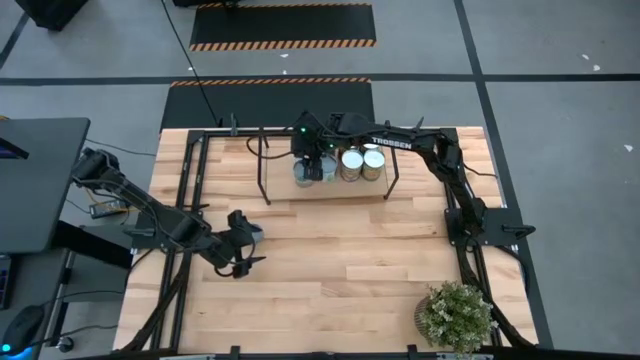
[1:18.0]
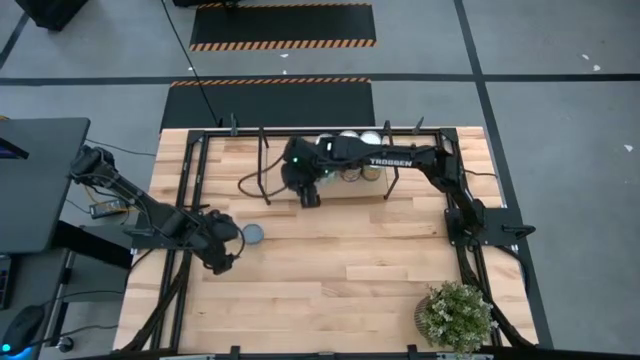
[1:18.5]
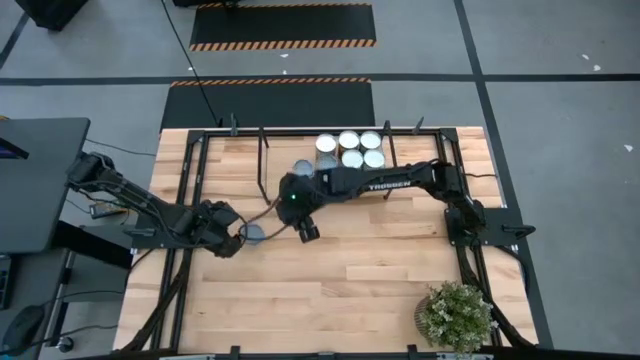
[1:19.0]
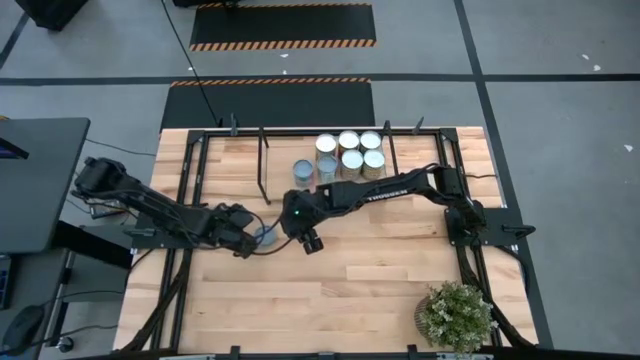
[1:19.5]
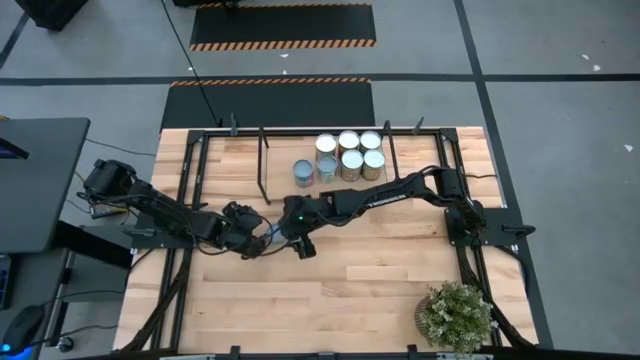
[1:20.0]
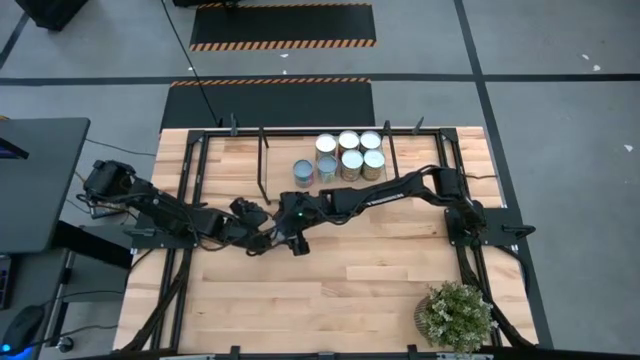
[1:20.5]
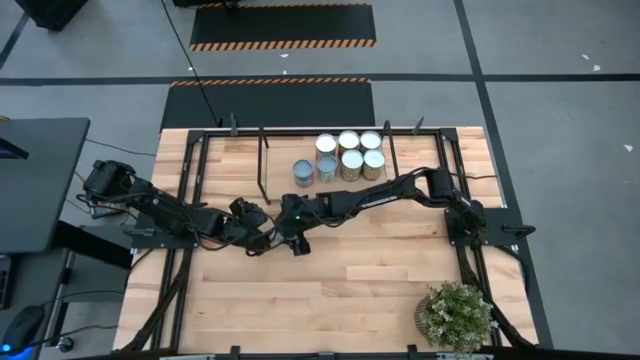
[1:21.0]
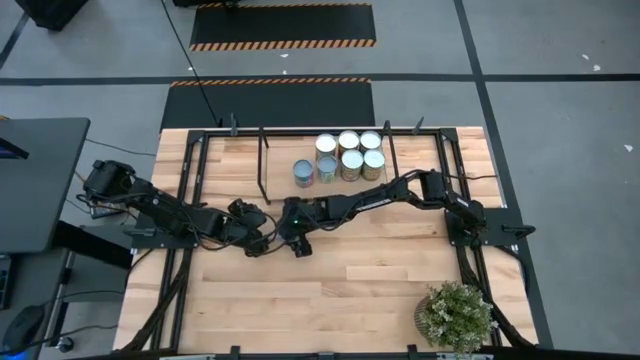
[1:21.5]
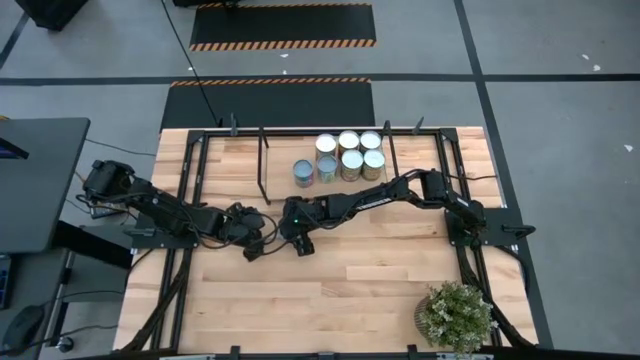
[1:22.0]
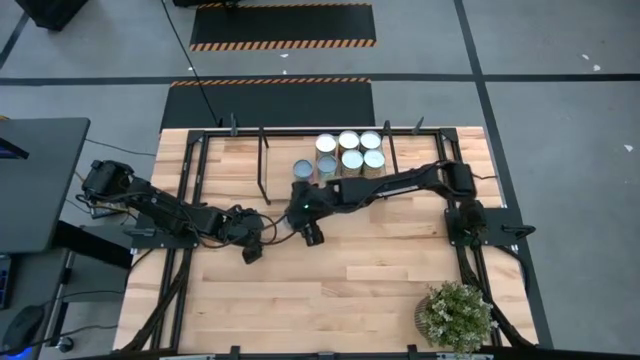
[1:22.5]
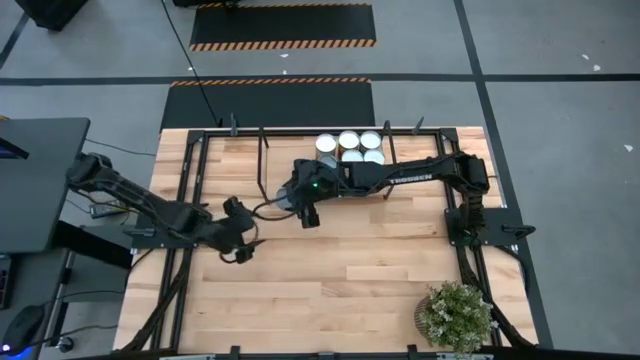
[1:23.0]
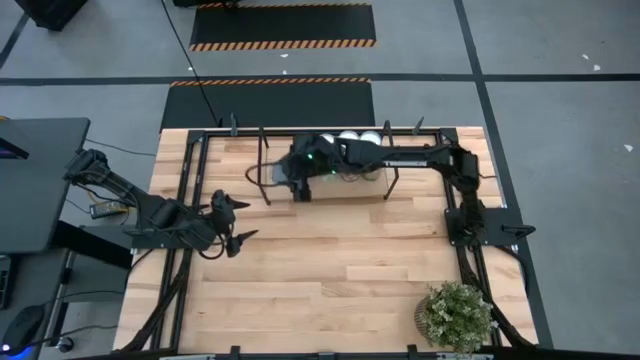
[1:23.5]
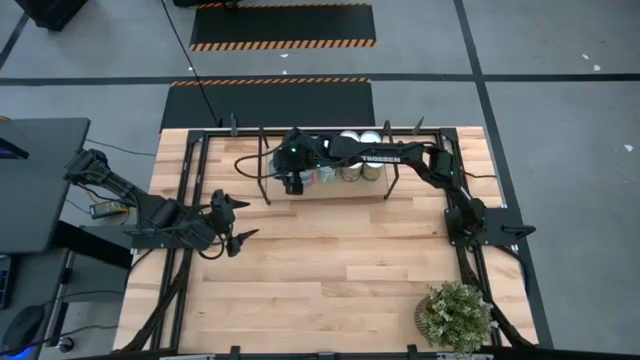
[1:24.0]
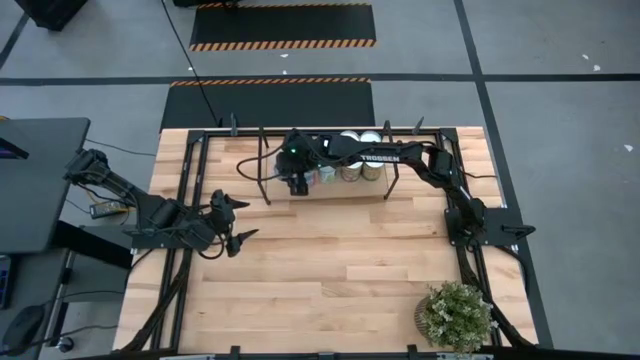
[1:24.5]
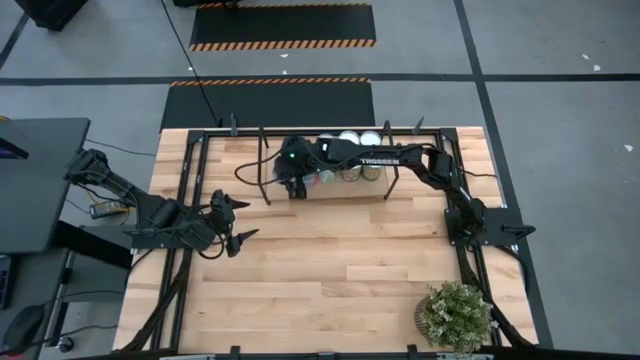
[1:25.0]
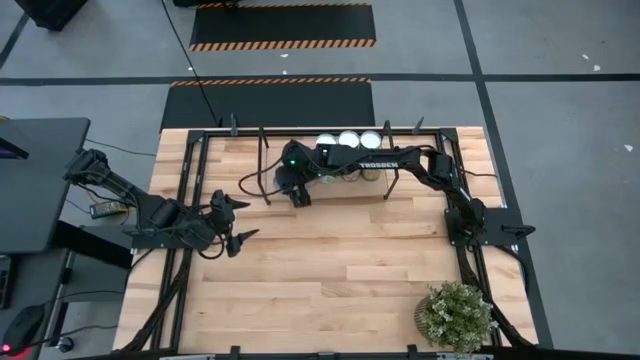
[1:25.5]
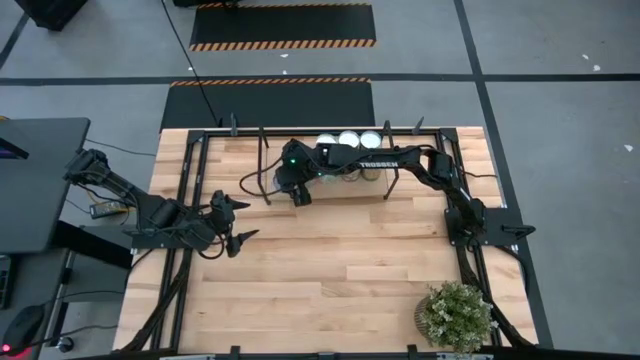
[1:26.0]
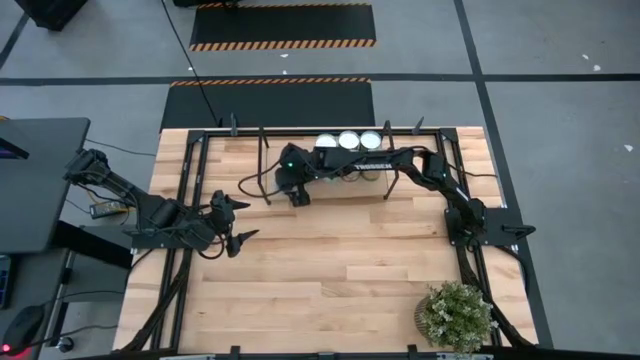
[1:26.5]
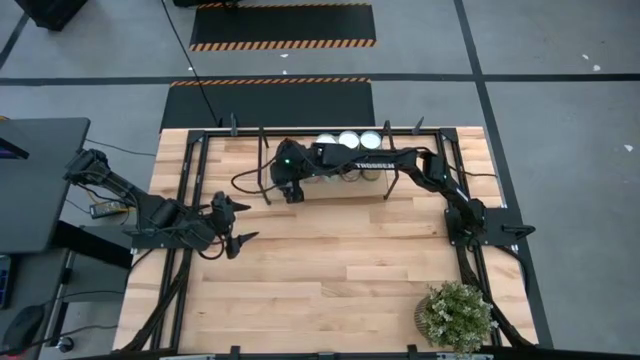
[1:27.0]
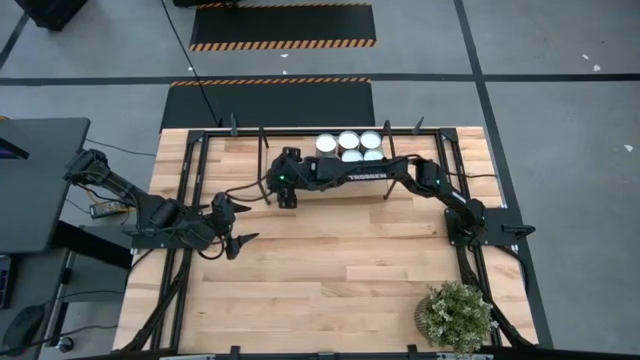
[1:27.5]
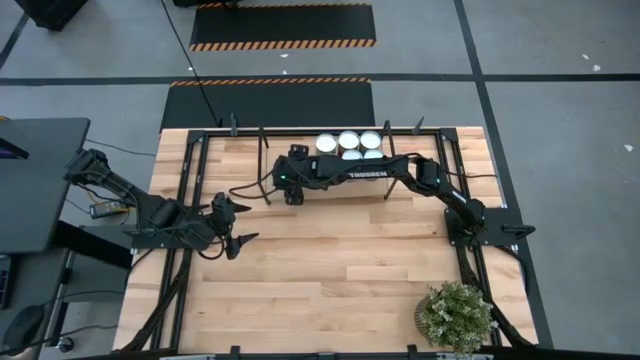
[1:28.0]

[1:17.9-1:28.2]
Task: Pick and place cans onto a shelf
Put the canned tuna on the shelf

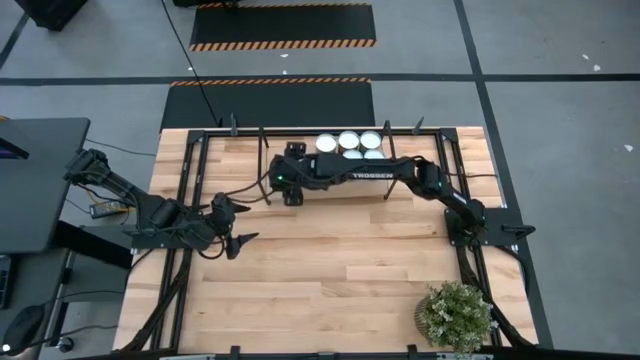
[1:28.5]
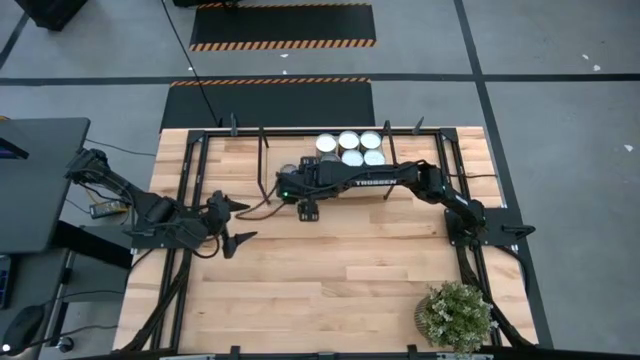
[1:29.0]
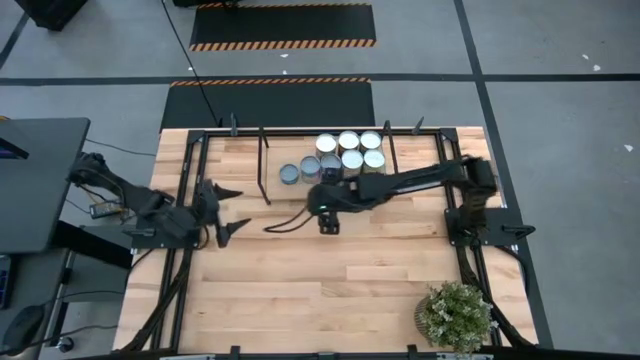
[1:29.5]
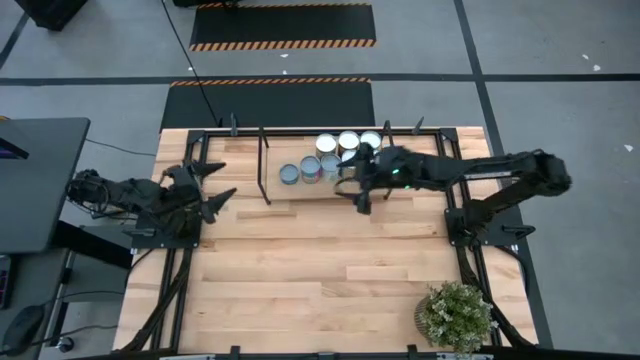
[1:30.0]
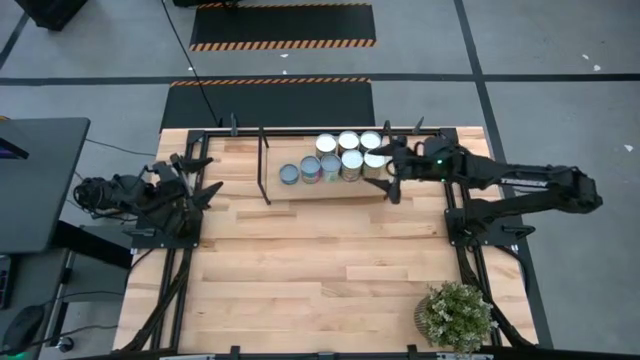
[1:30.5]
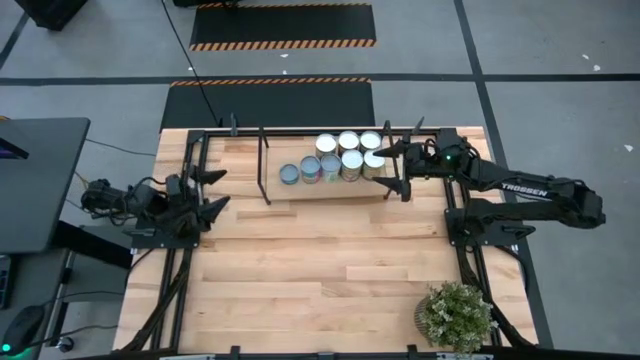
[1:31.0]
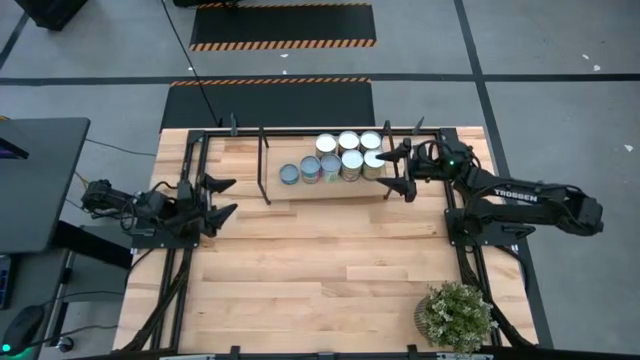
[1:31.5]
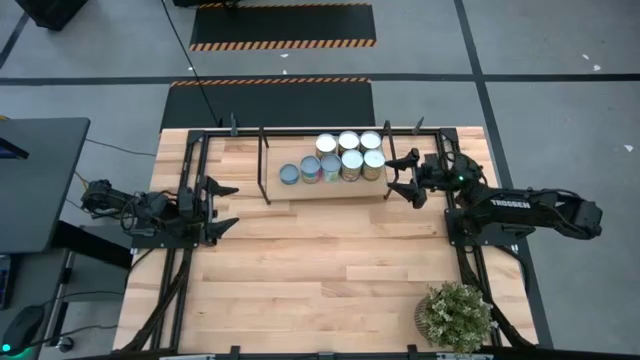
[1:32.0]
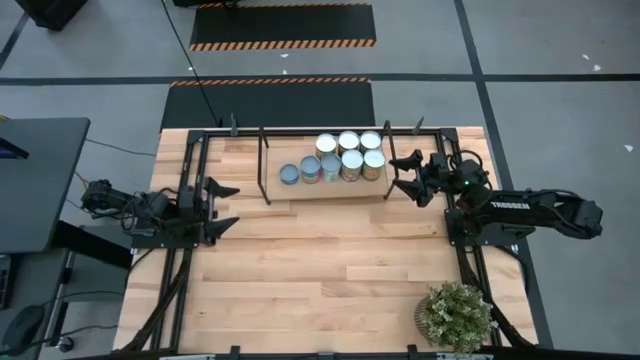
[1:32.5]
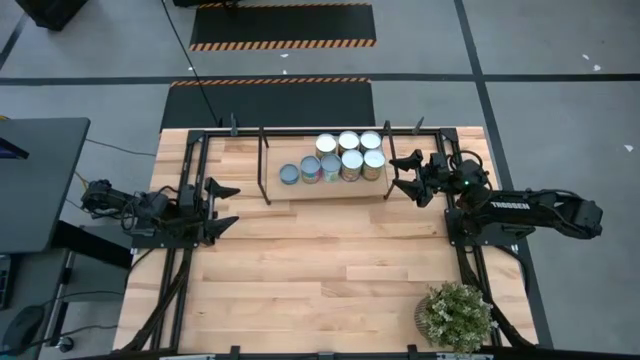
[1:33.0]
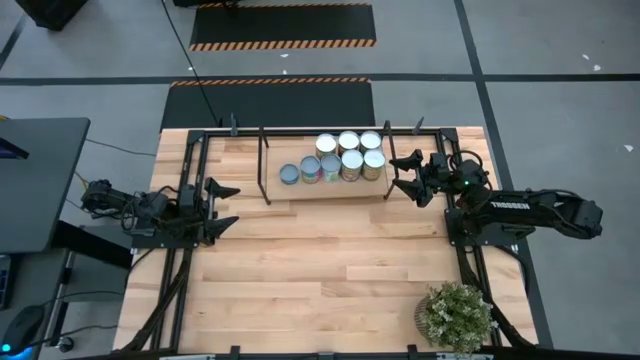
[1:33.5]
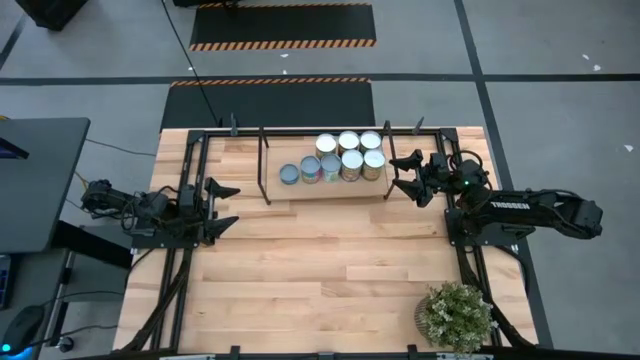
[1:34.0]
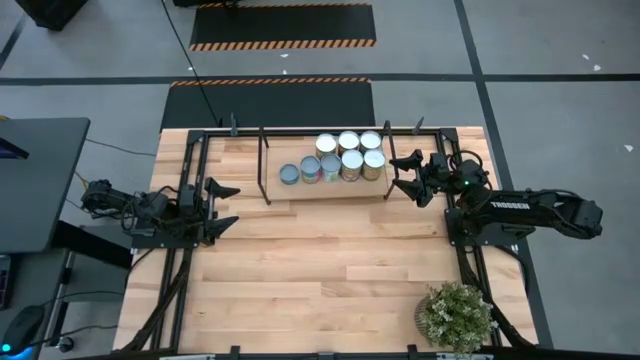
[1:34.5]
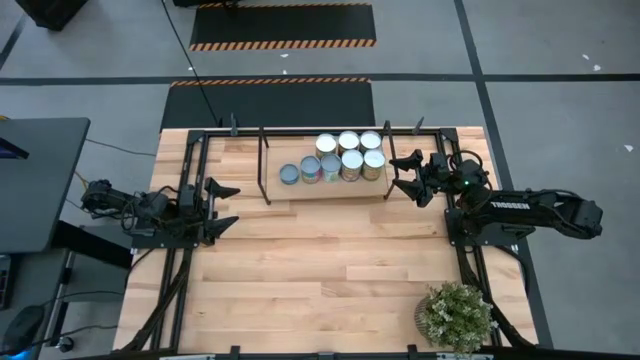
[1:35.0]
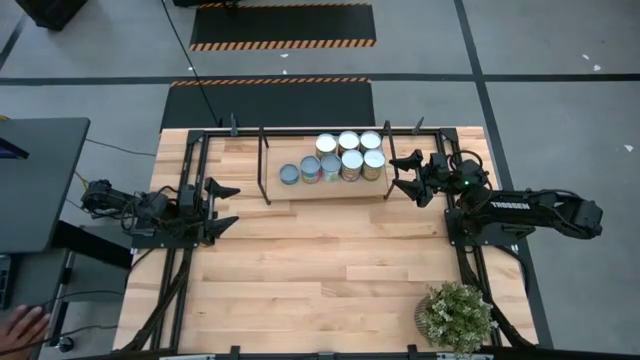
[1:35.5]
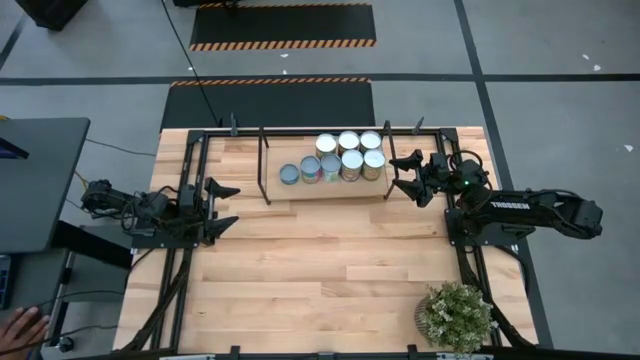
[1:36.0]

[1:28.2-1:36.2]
Return to Home Position

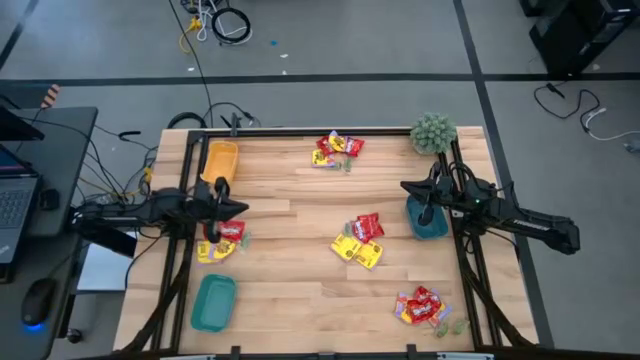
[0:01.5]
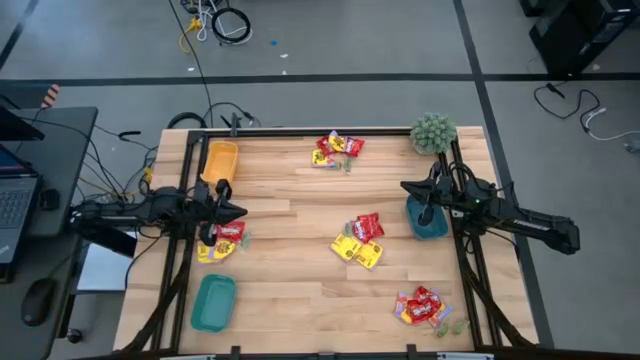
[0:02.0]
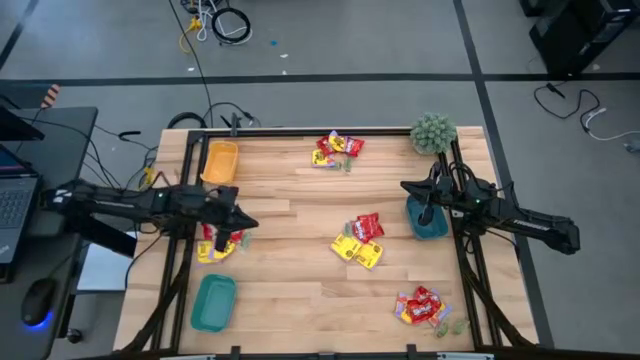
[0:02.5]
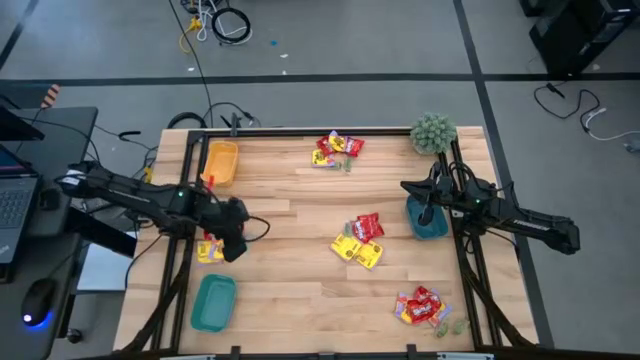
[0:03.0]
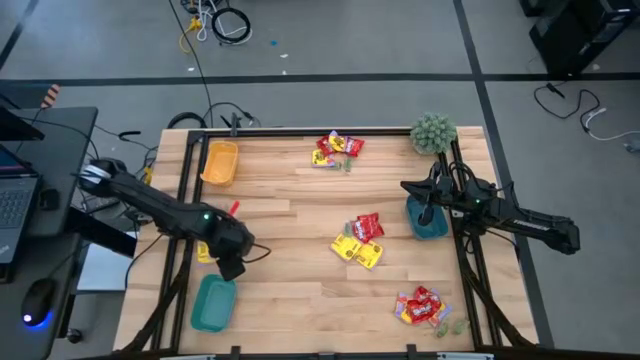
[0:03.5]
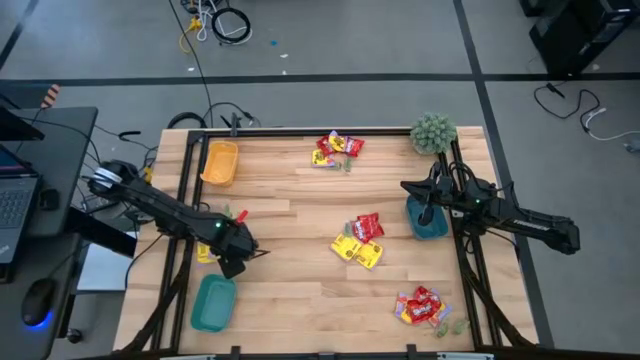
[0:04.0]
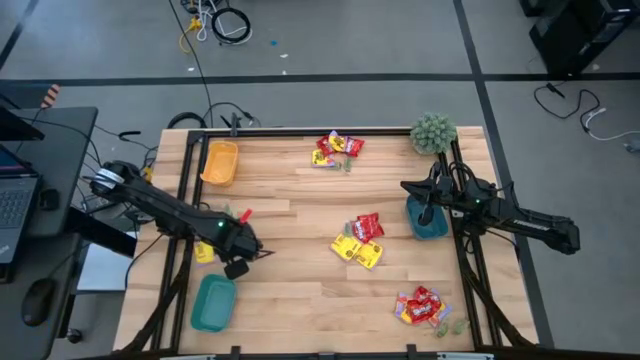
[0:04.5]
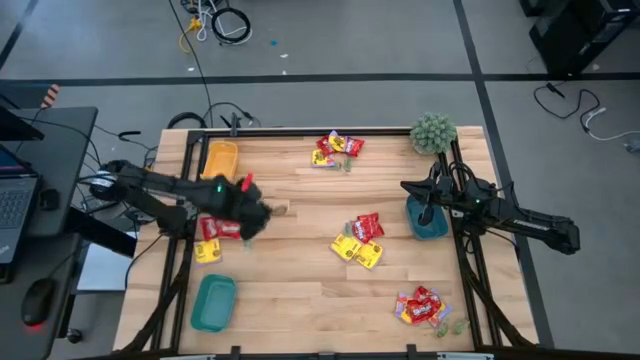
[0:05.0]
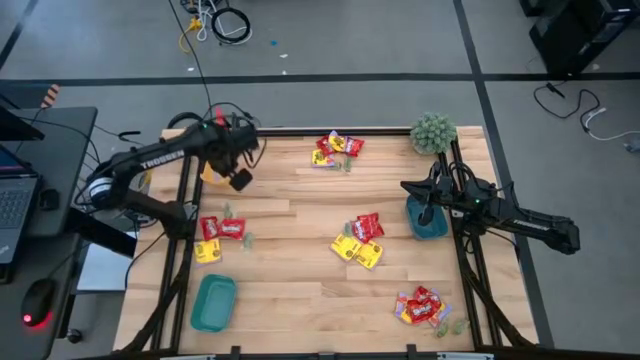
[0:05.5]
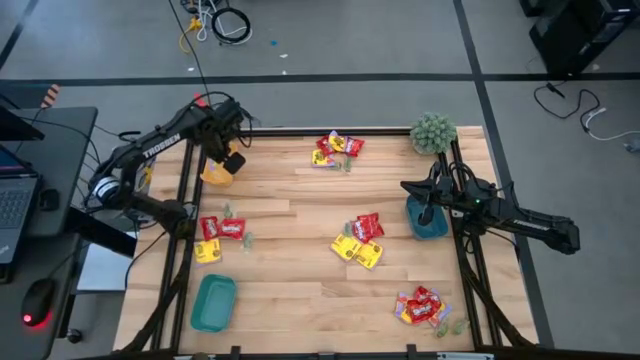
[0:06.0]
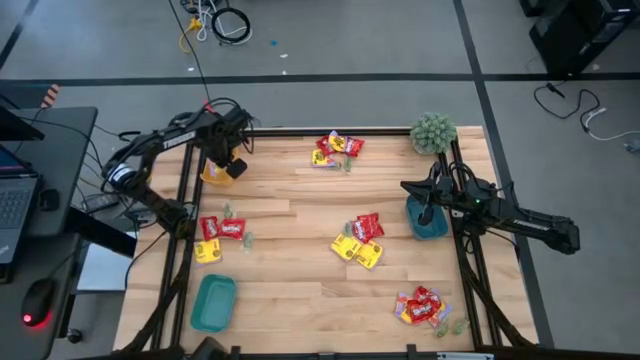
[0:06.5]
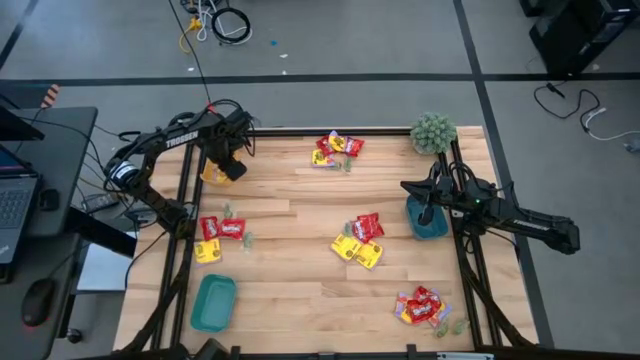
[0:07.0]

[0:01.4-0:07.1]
Task: Sort candy
Put the yellow packet of candy into the yellow bin
